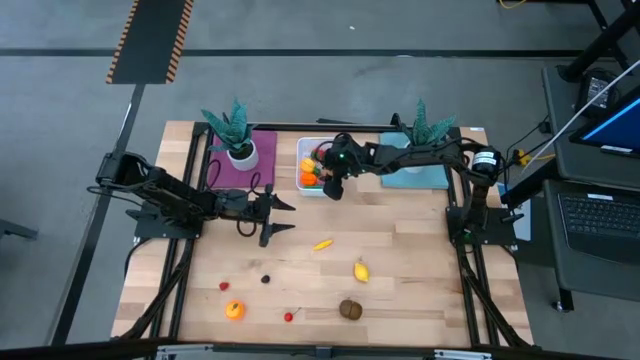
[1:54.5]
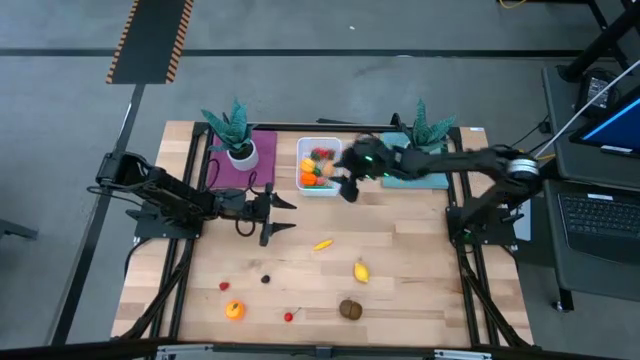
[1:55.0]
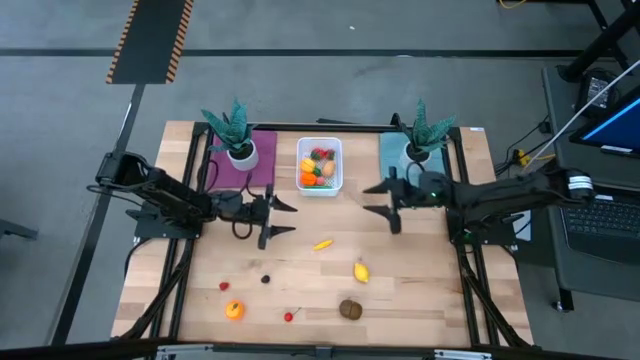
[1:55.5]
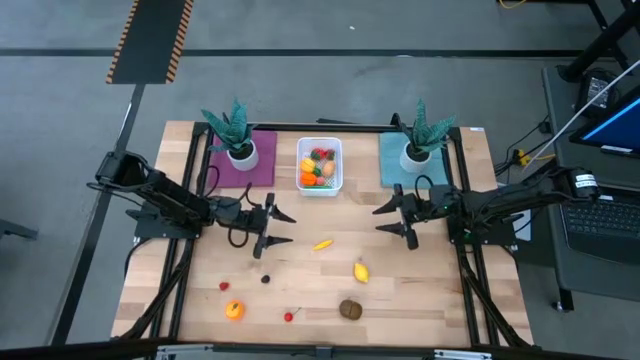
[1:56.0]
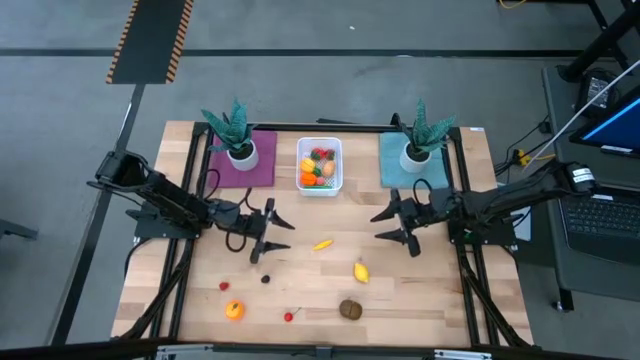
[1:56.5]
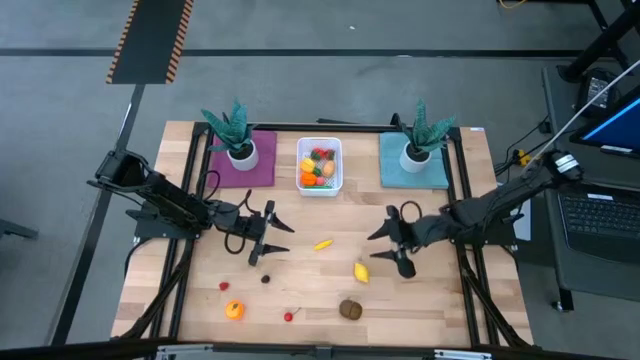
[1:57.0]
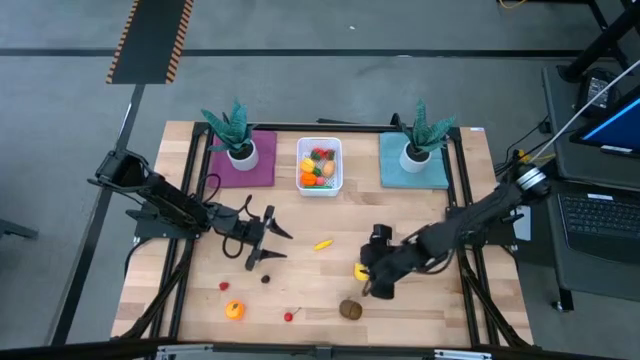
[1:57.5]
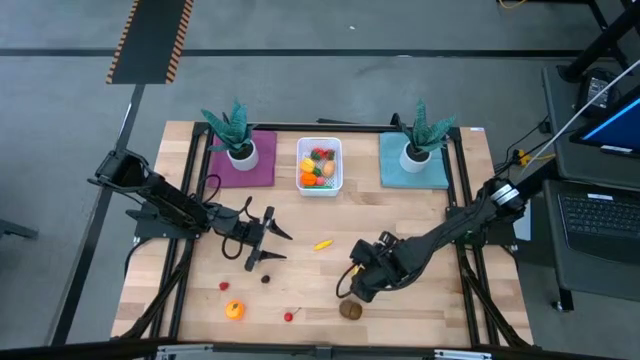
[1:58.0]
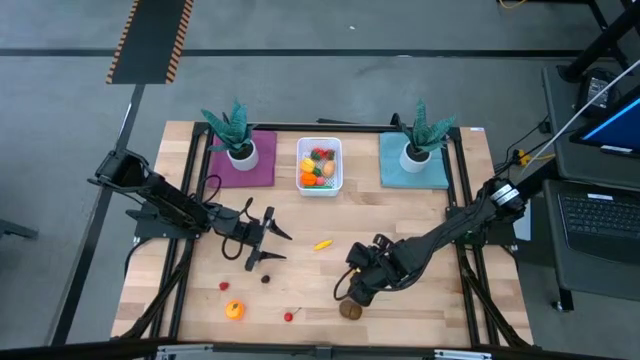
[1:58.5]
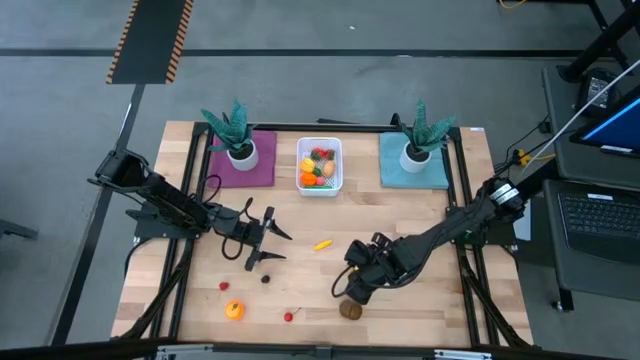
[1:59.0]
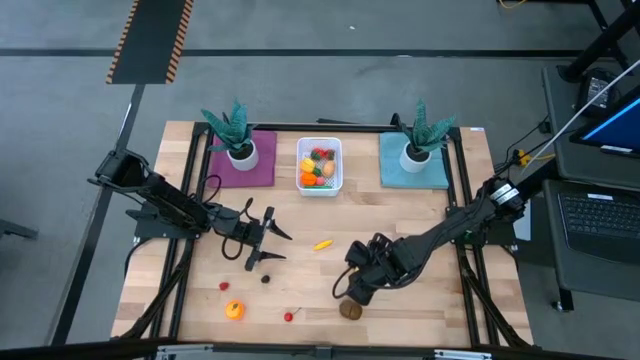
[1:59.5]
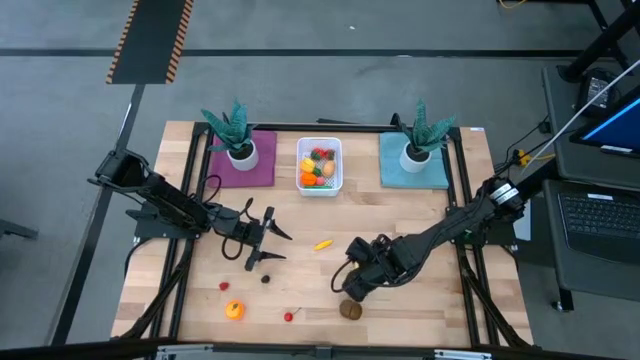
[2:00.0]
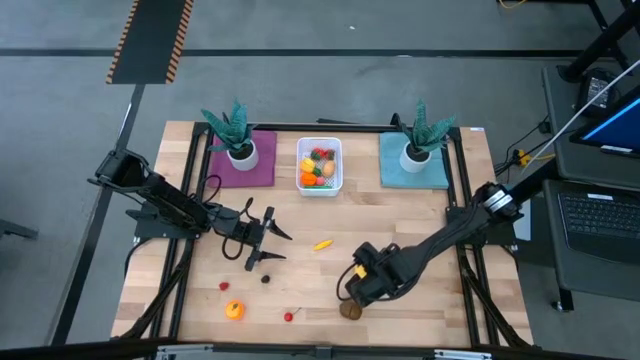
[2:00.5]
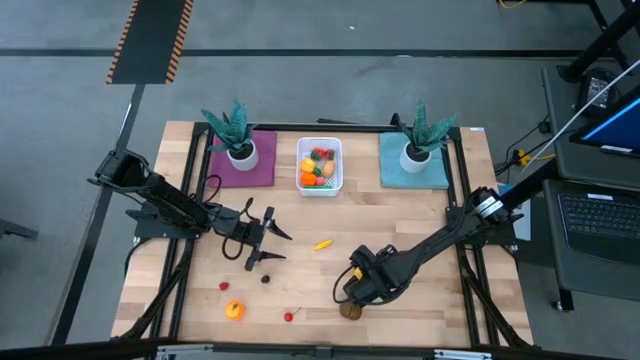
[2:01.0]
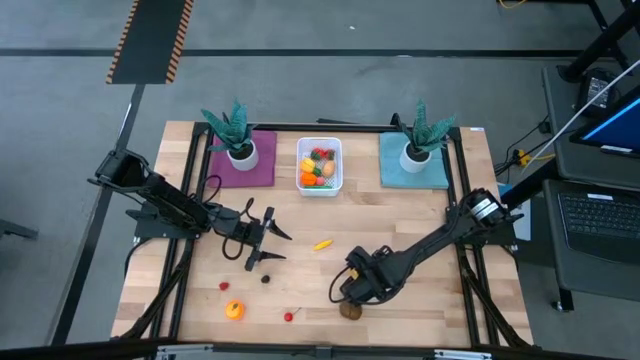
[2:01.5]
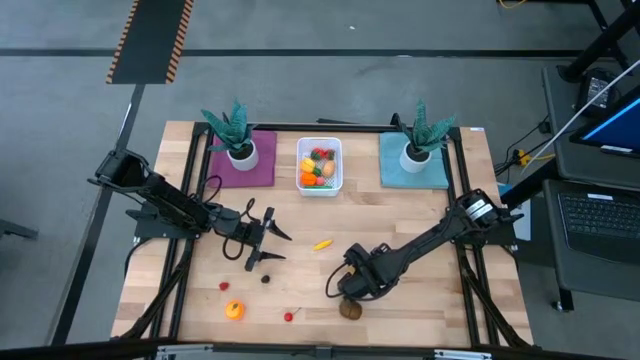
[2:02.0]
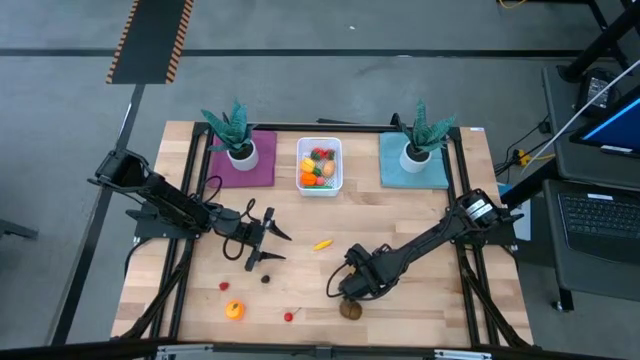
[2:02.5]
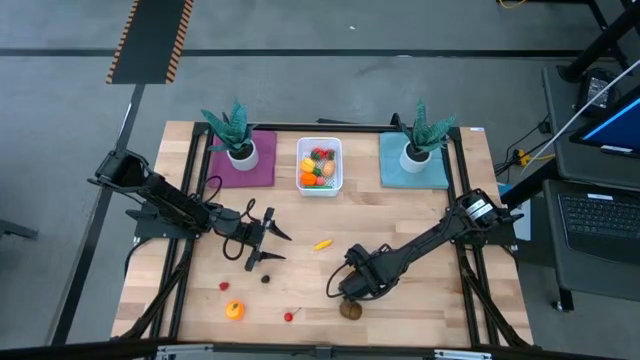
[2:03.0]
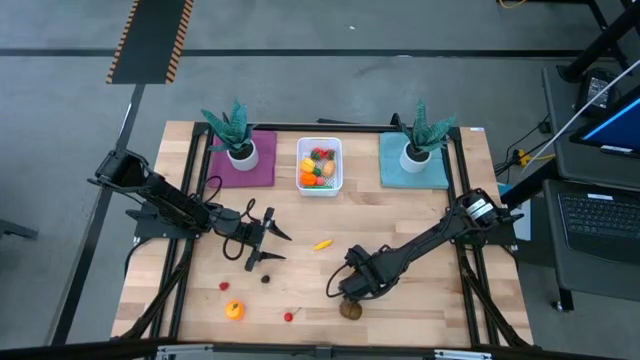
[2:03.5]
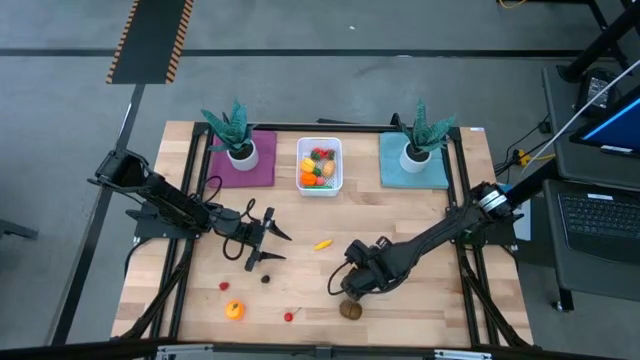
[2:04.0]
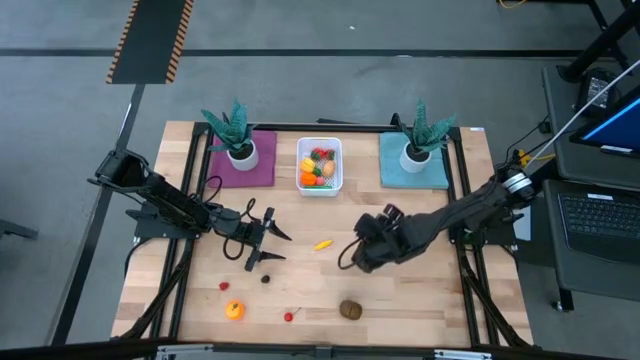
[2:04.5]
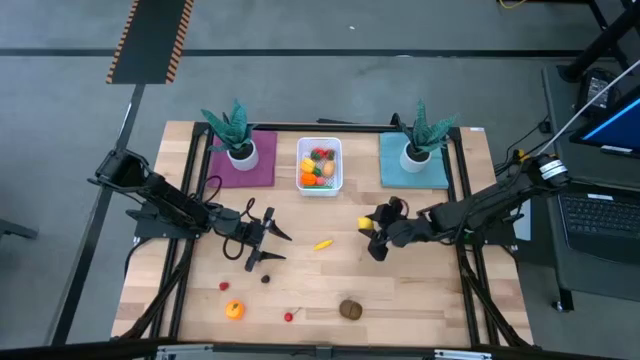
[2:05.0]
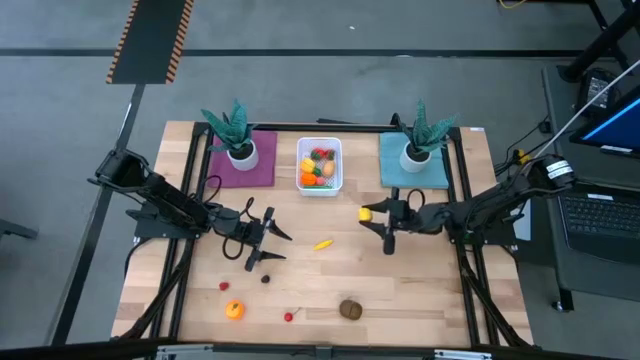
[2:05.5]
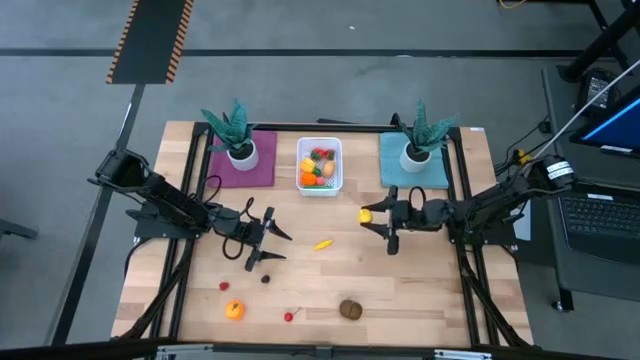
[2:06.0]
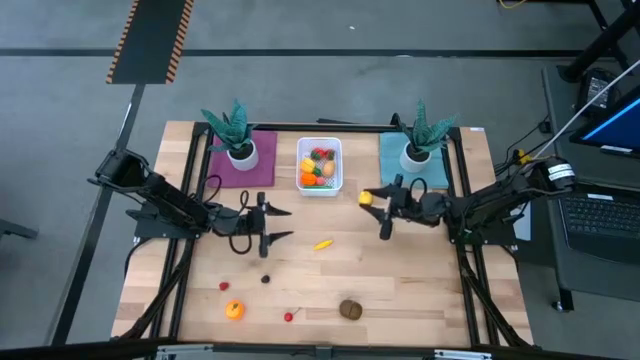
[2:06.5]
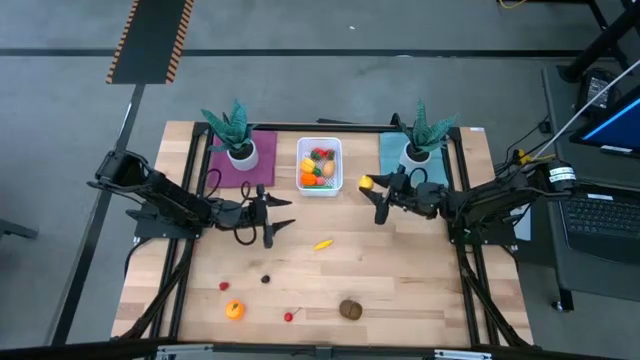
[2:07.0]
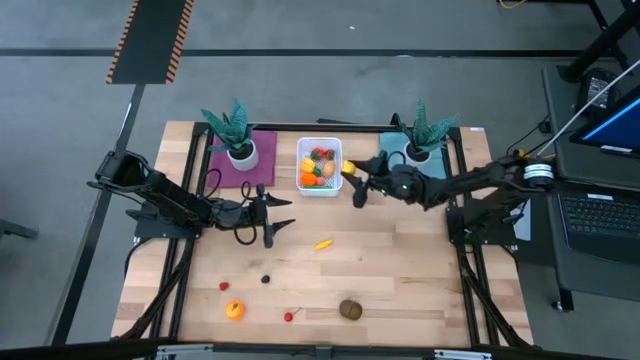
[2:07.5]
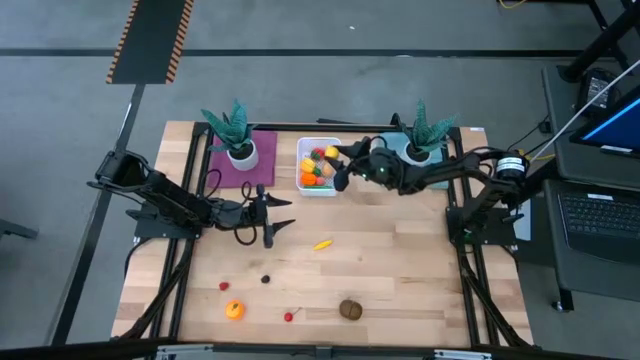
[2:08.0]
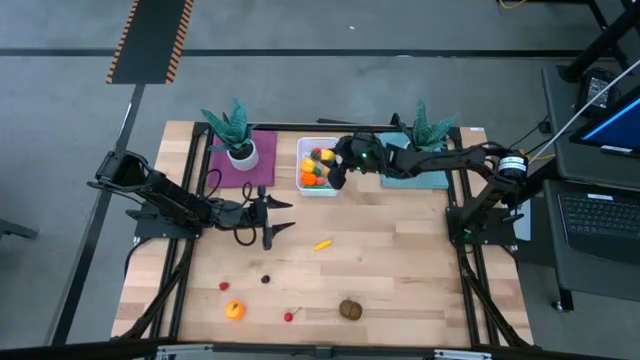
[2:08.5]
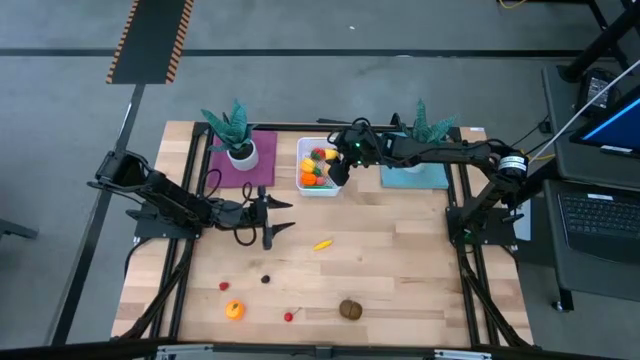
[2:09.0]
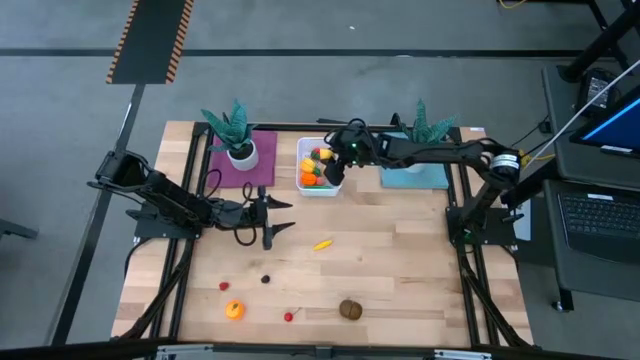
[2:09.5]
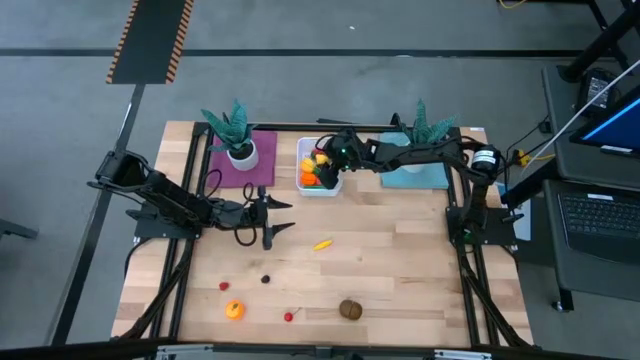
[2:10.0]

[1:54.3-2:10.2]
Task: Pick and placing Produce into tupperware
Put the yellow lemon into the white bin

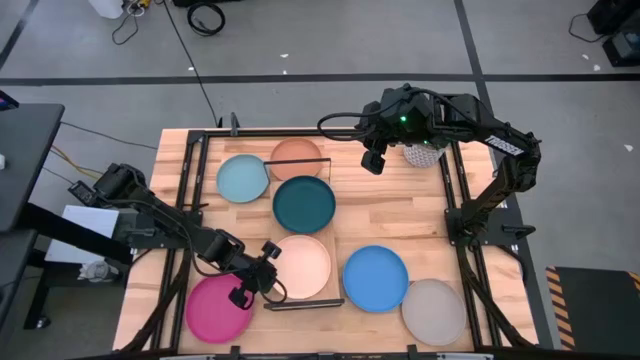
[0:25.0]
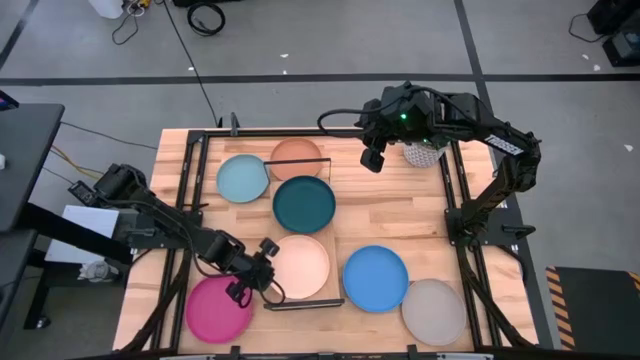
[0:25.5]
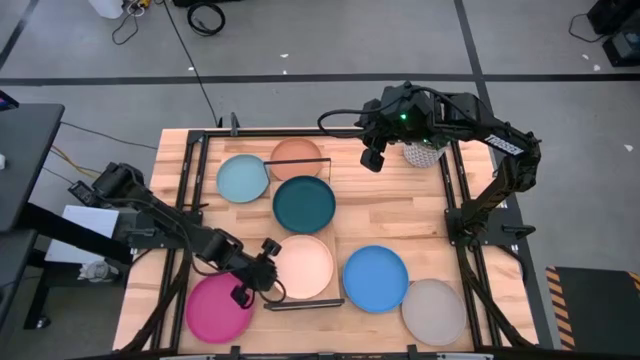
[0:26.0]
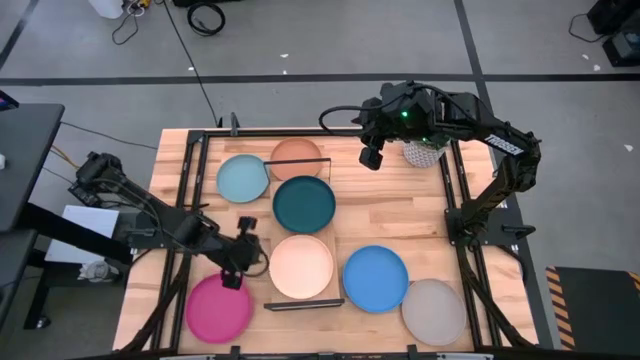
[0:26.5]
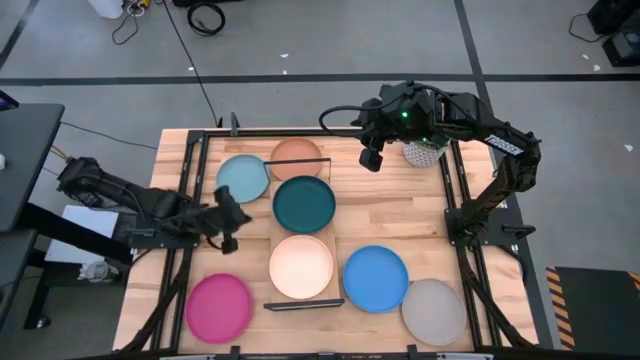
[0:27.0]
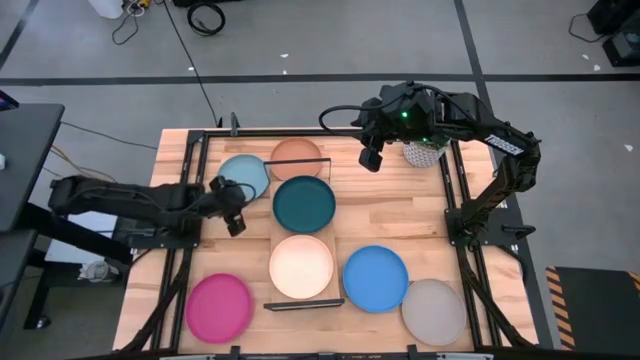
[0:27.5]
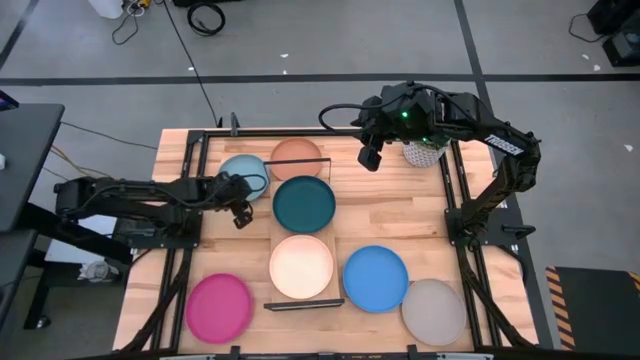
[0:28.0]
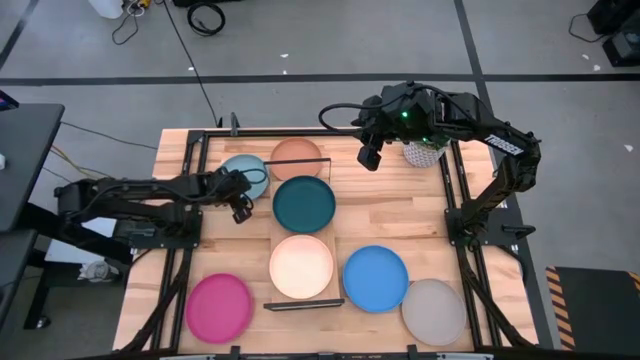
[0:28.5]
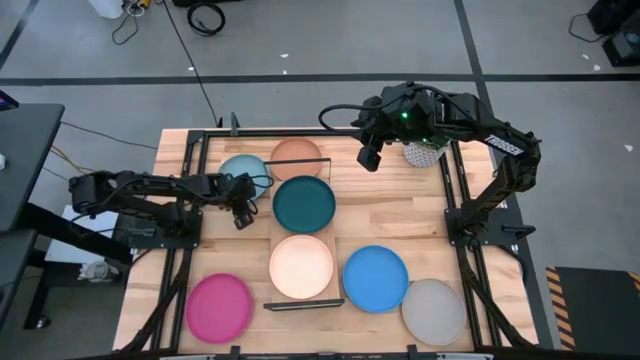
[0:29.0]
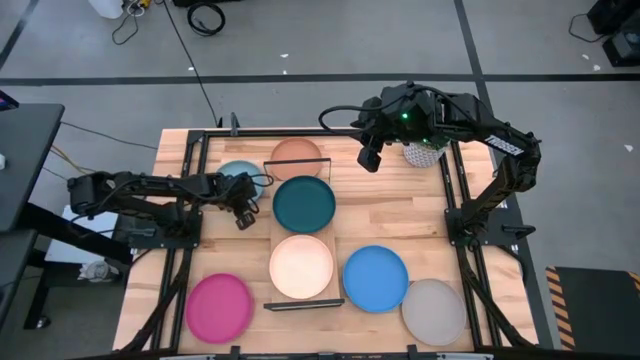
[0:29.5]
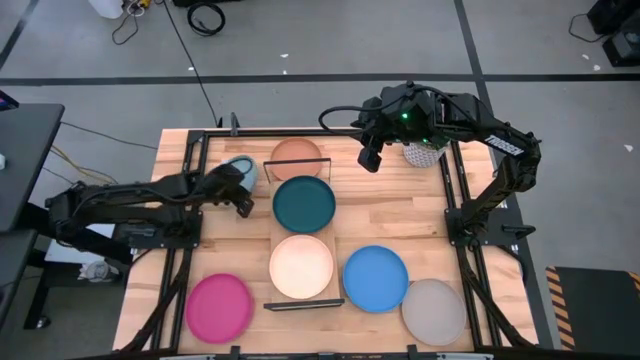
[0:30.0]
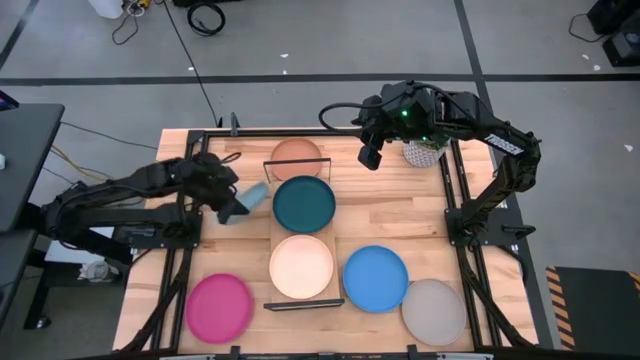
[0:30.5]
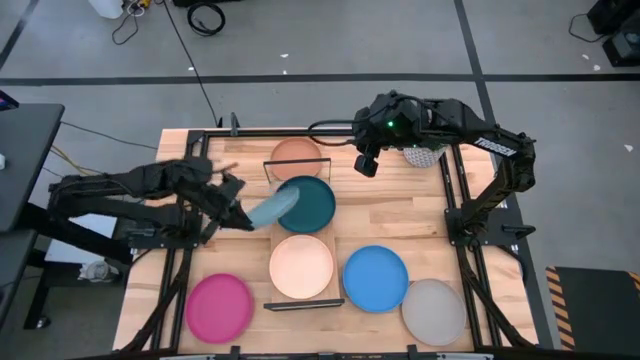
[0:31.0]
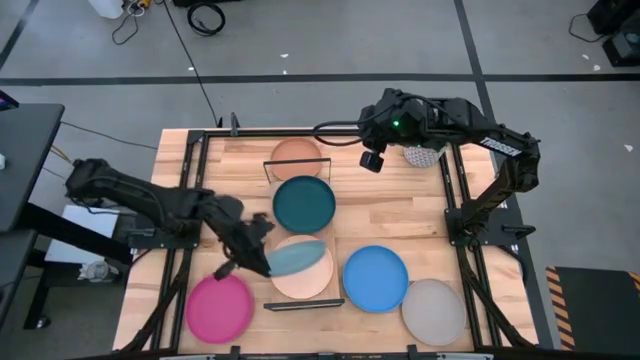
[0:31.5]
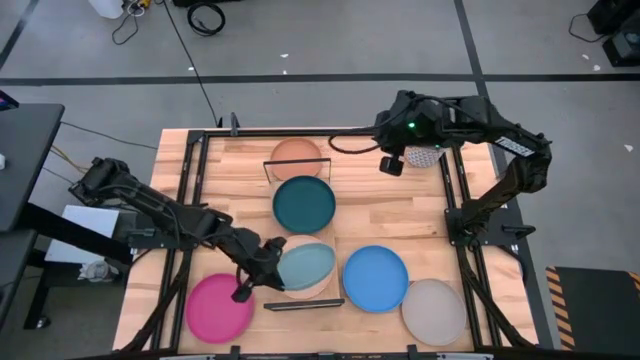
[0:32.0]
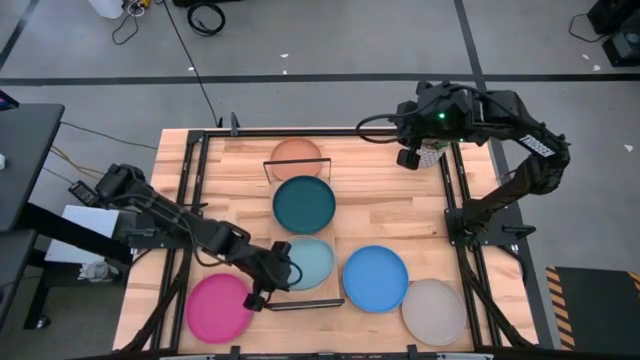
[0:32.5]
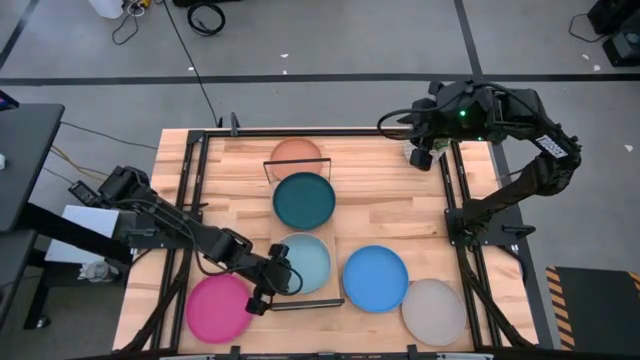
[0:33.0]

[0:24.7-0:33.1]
Task: Place and stack plates onto a shelf
Stack the light blue plate on top of the light brown plate on the shelf
